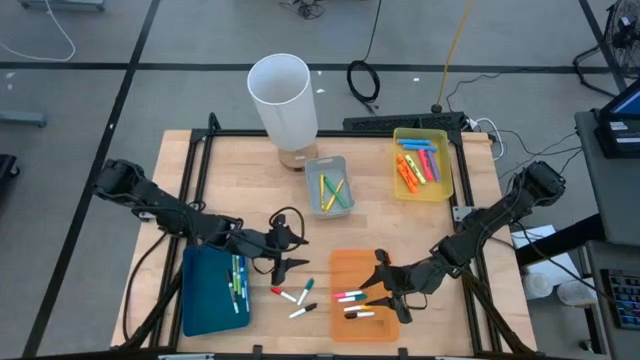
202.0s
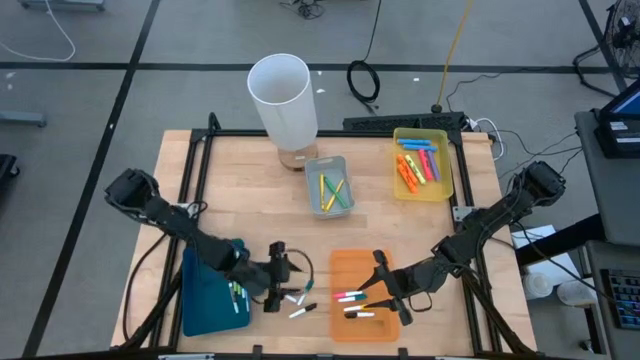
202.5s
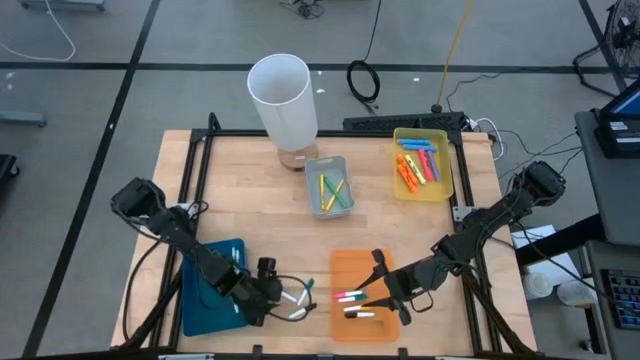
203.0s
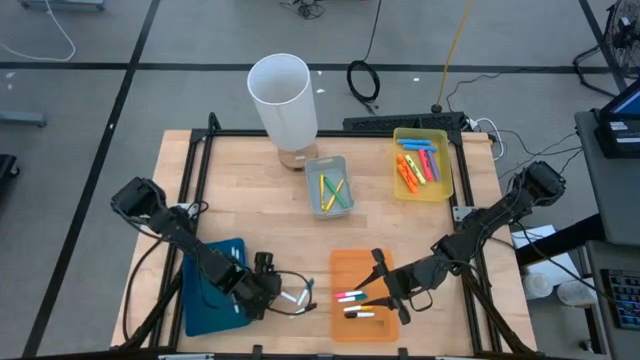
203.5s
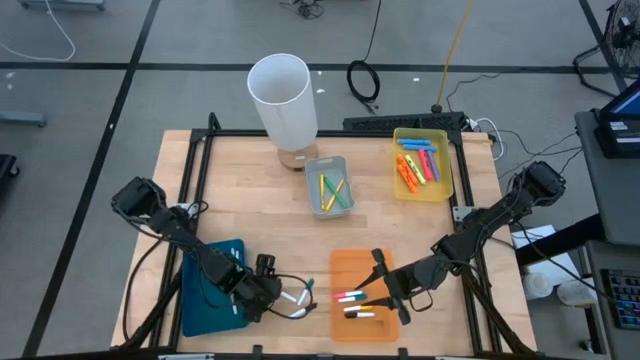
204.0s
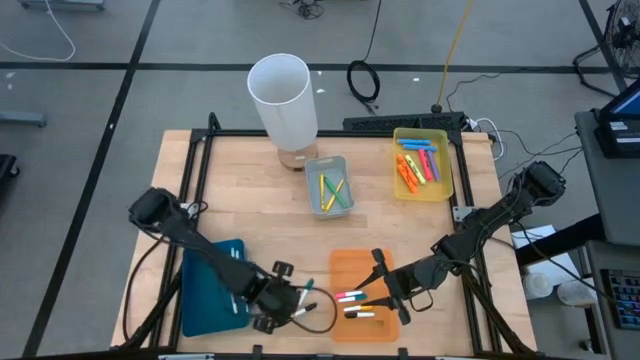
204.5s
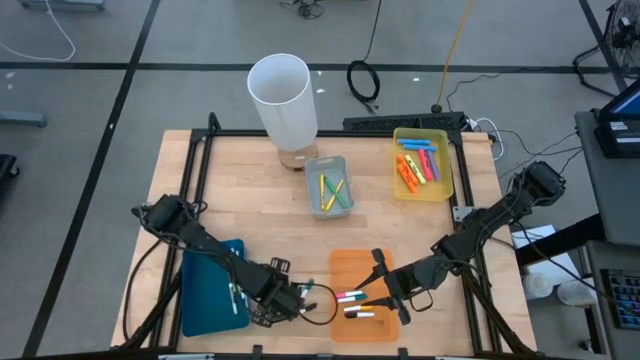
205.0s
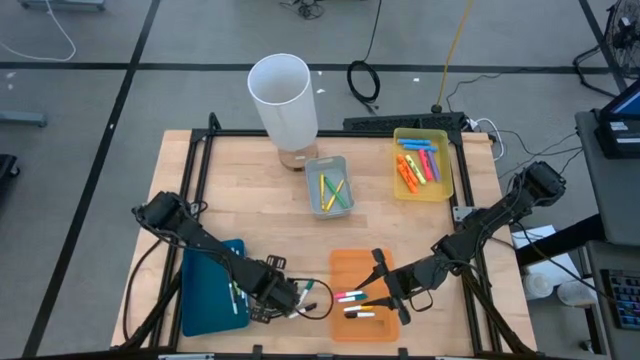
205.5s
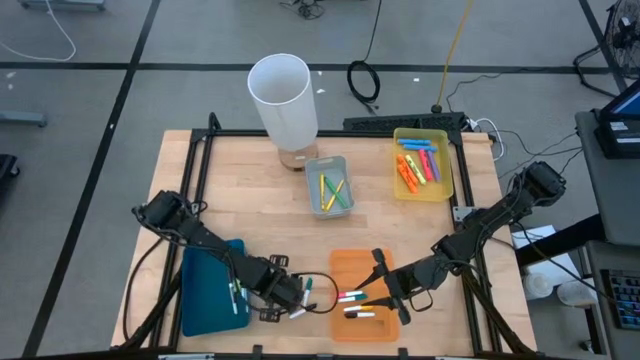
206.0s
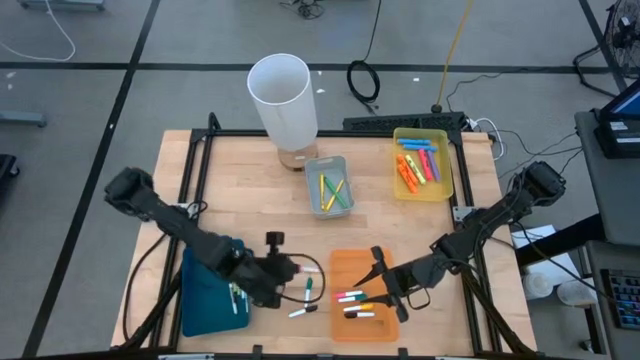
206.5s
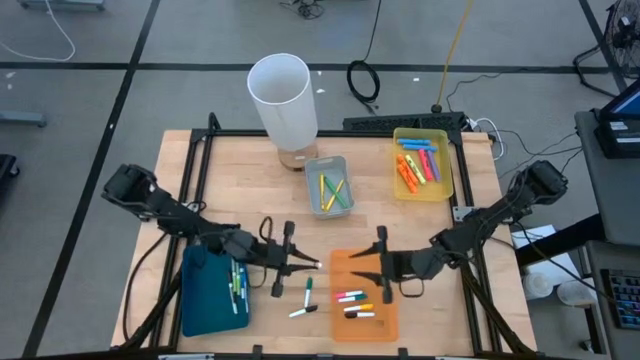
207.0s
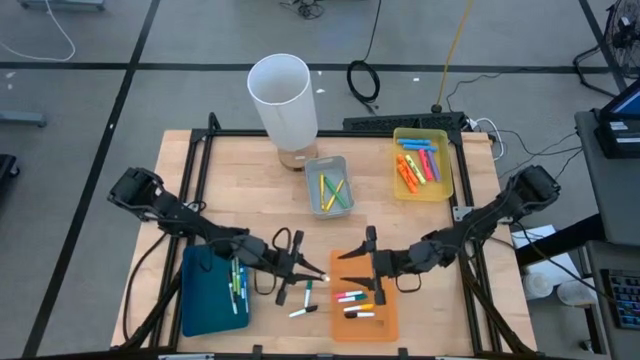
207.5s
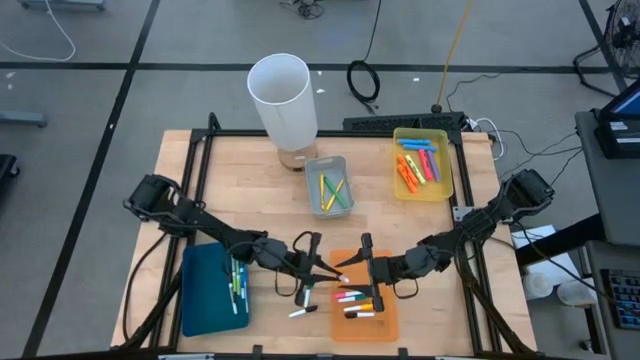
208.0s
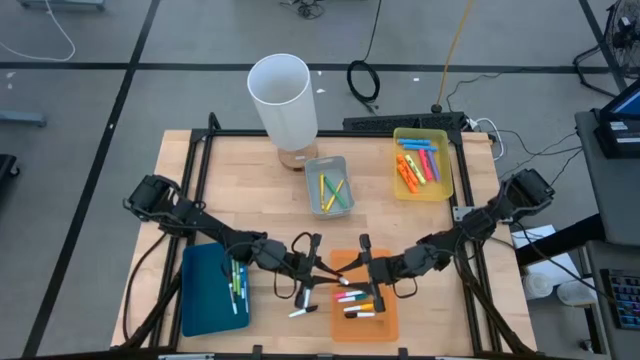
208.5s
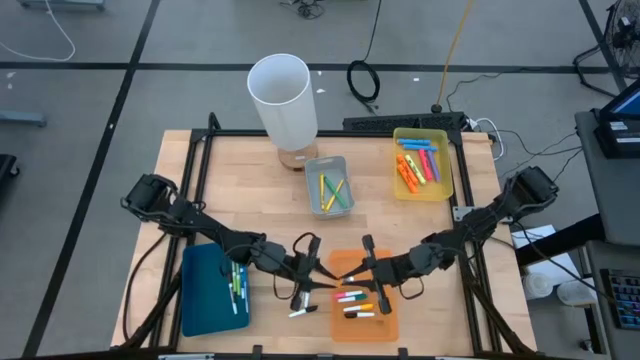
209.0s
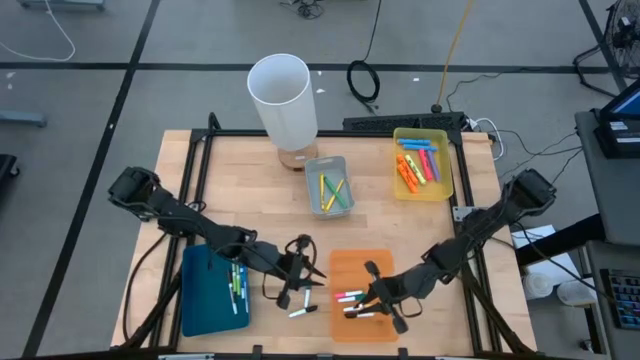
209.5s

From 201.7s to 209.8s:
Task: Pick & Place Markers
Put the small red highlighter pen in the orange bin

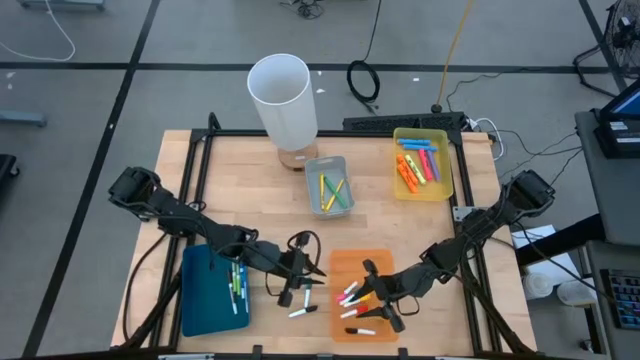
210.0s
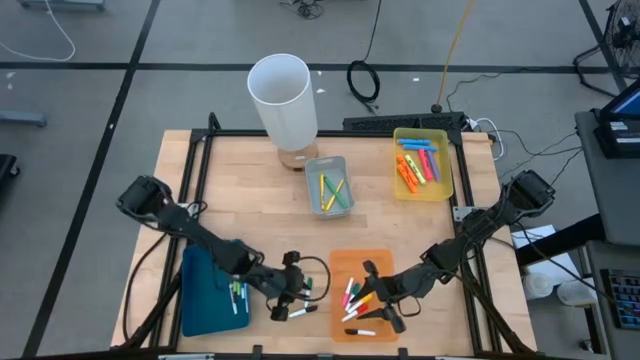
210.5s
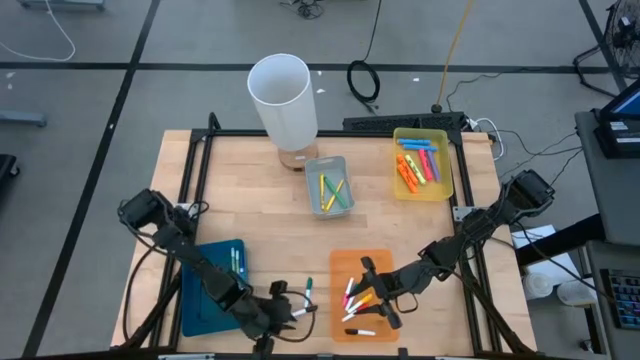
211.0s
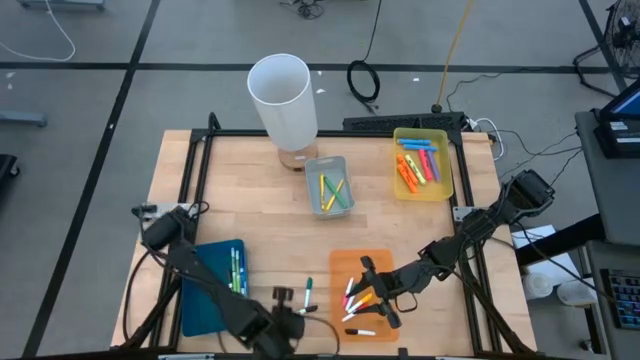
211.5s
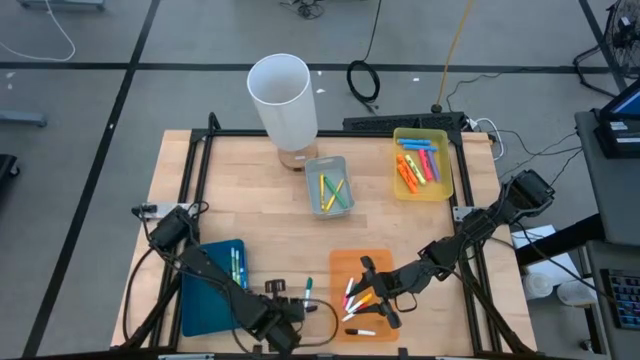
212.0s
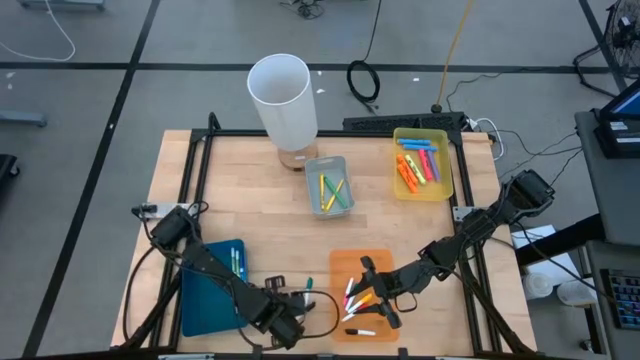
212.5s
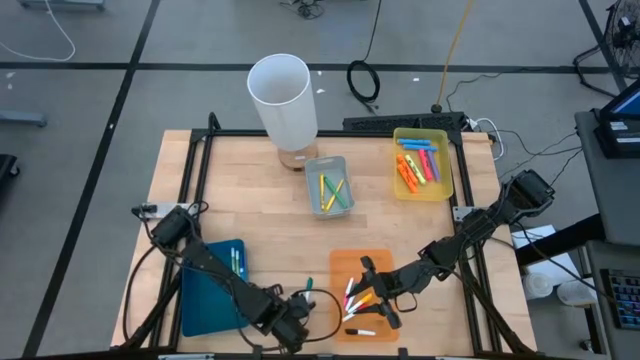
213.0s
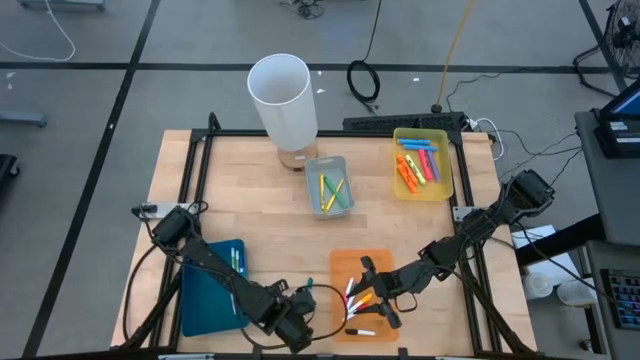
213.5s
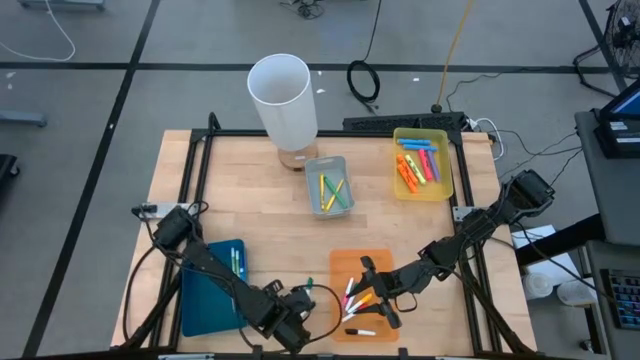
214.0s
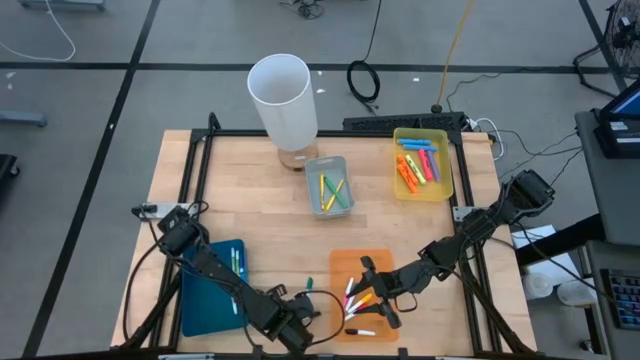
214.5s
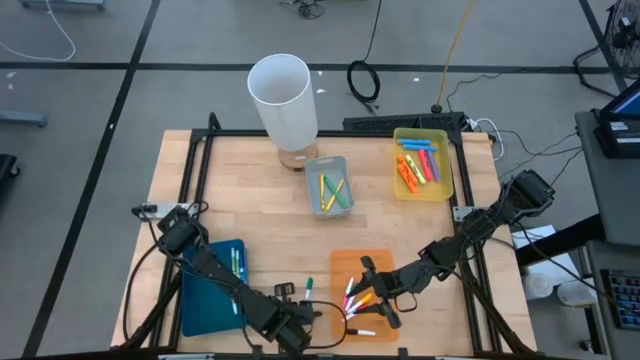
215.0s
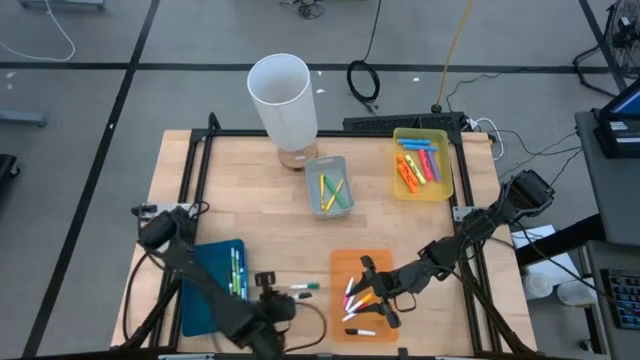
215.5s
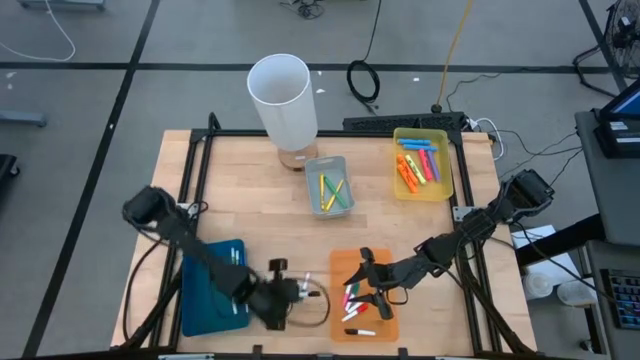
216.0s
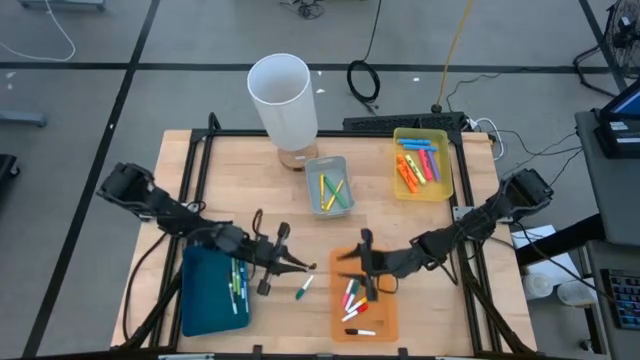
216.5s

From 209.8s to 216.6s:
Put the small black highlighter pen in the orange bin

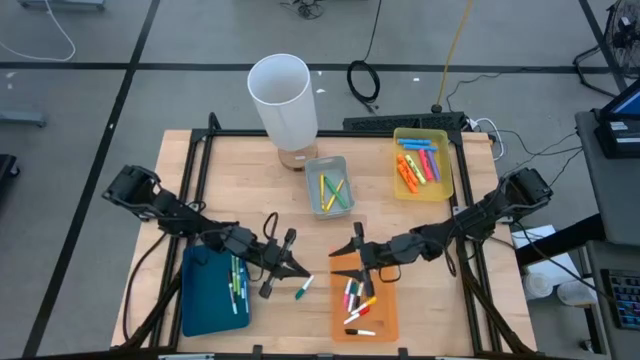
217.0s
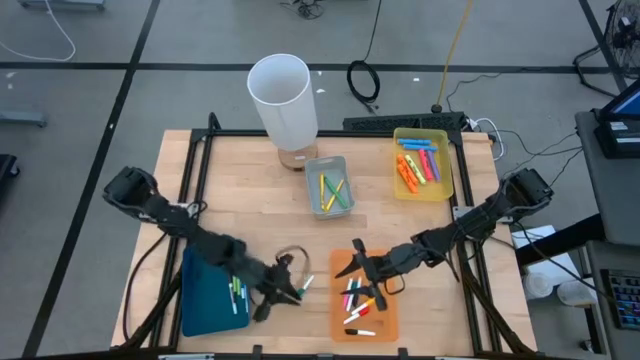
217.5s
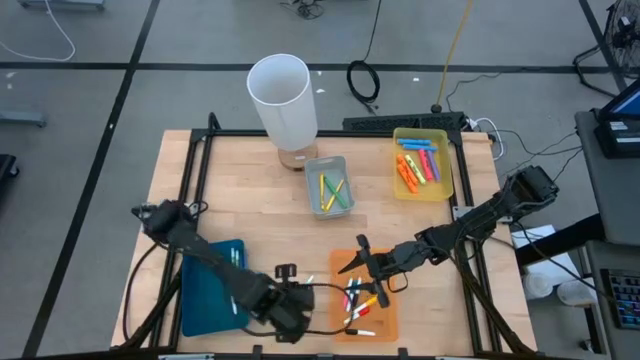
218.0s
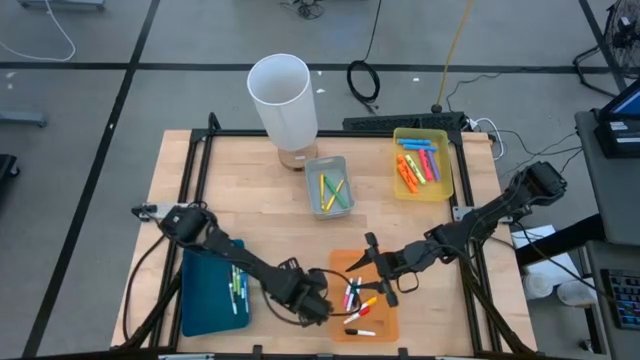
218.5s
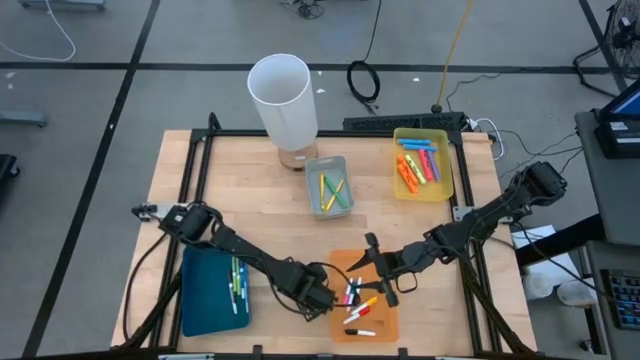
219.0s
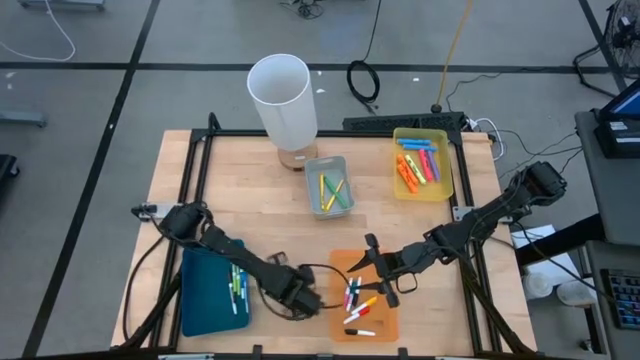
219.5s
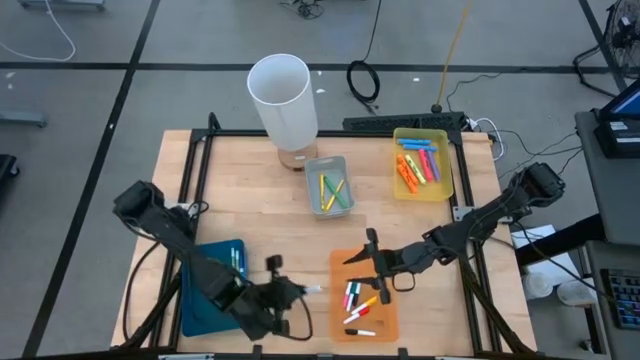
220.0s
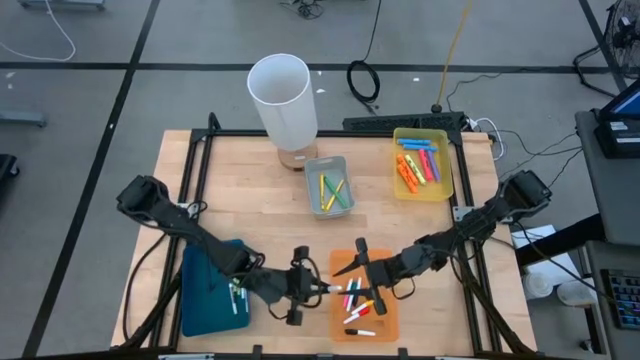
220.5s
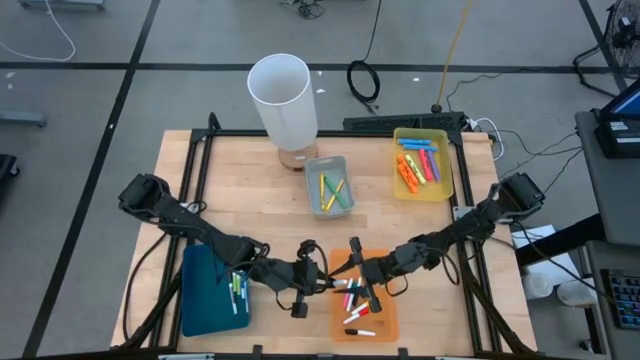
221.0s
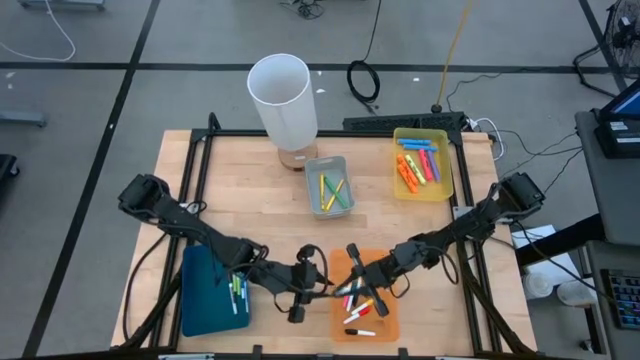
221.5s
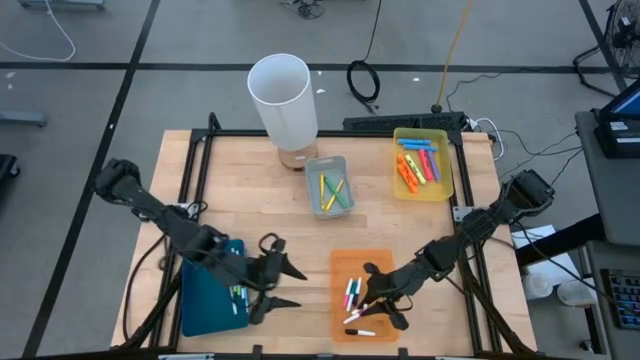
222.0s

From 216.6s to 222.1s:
Put the small green highlighter pen in the orange bin
